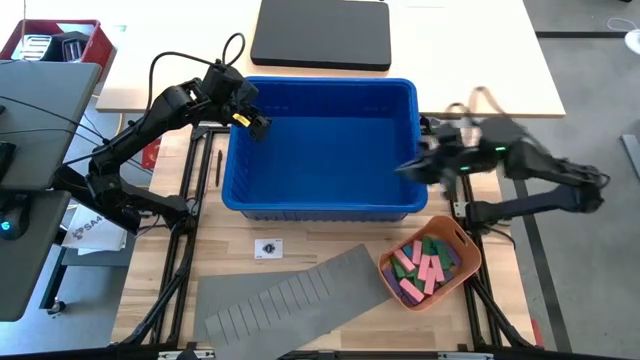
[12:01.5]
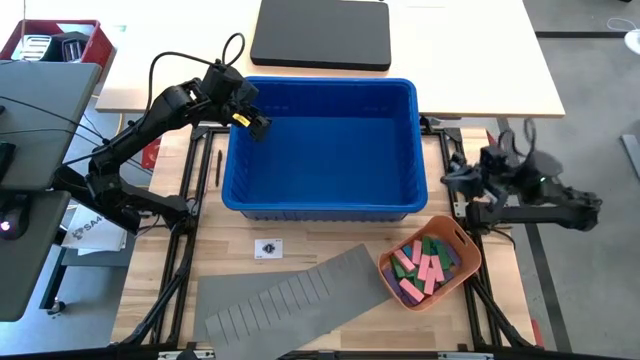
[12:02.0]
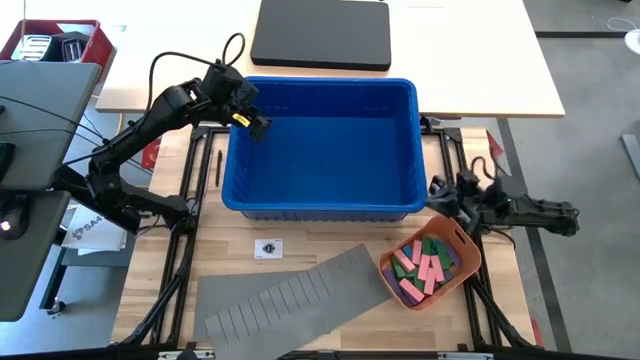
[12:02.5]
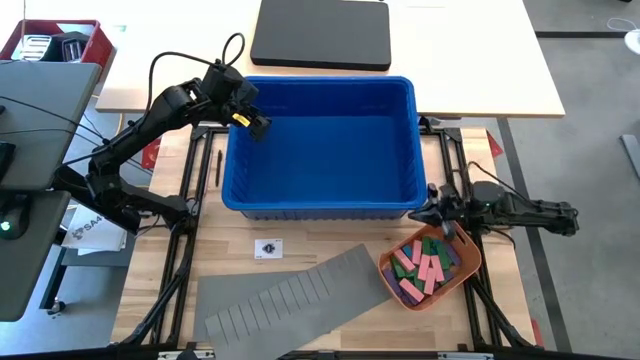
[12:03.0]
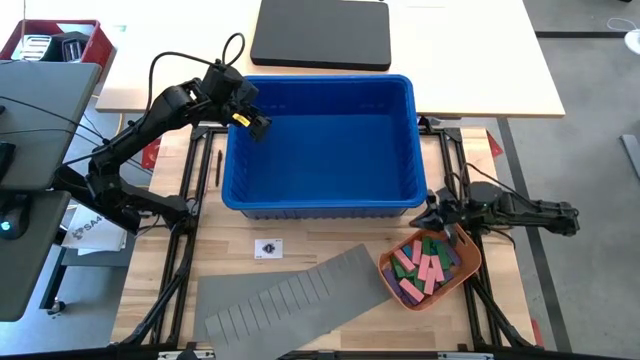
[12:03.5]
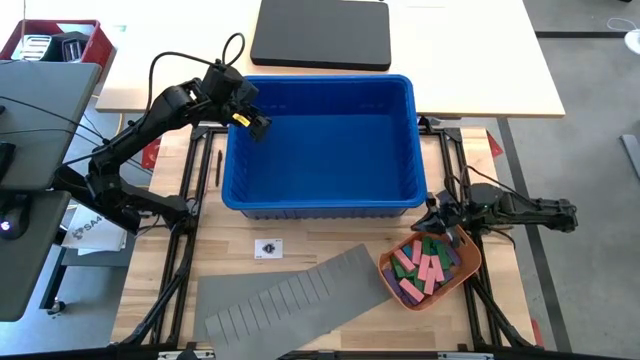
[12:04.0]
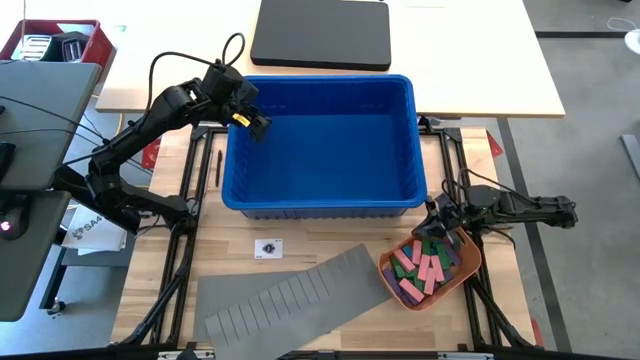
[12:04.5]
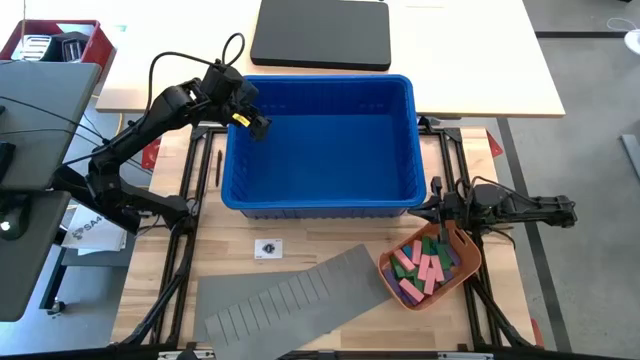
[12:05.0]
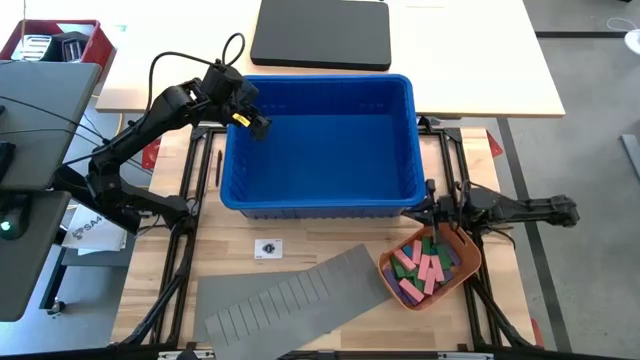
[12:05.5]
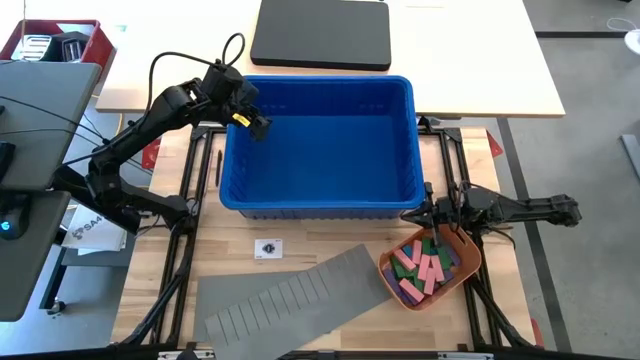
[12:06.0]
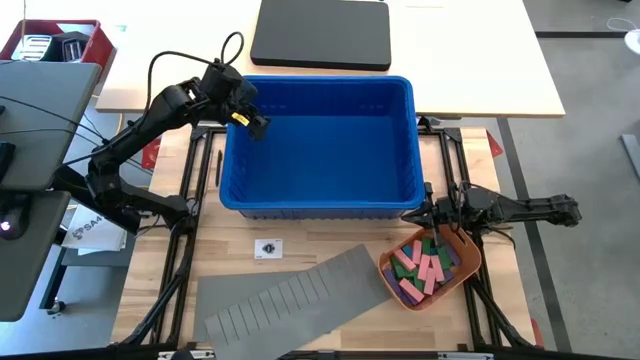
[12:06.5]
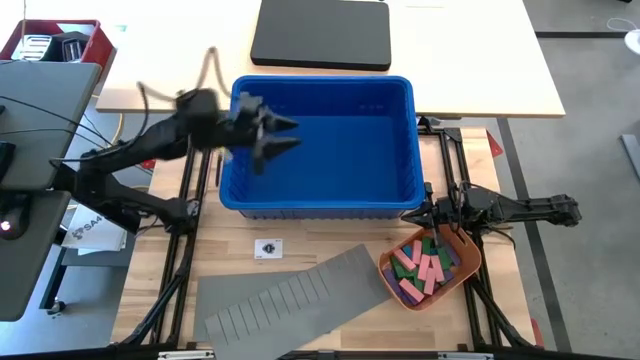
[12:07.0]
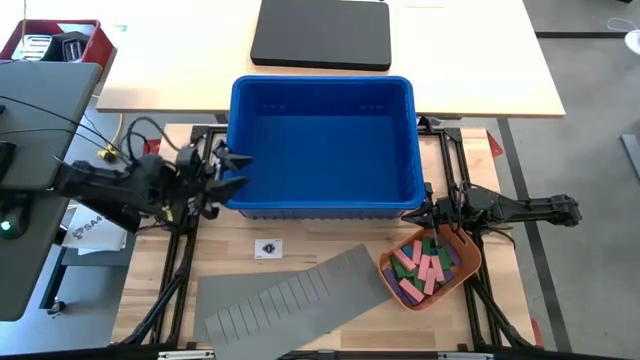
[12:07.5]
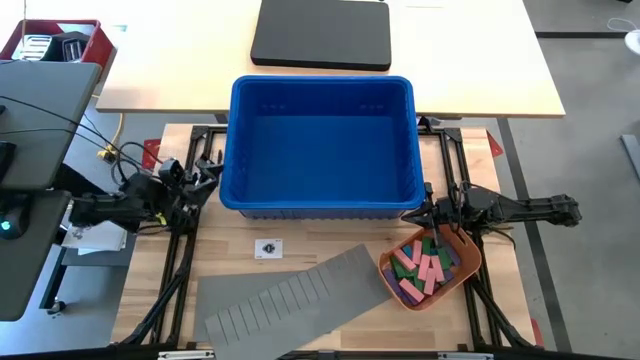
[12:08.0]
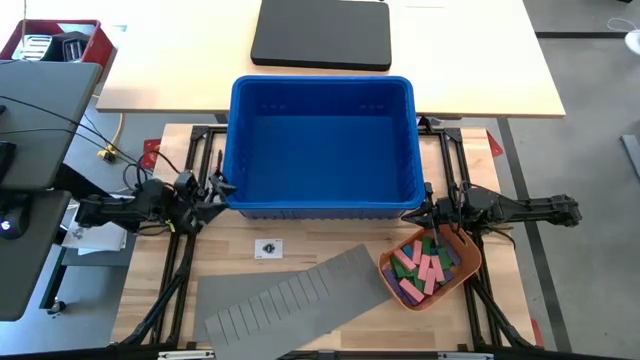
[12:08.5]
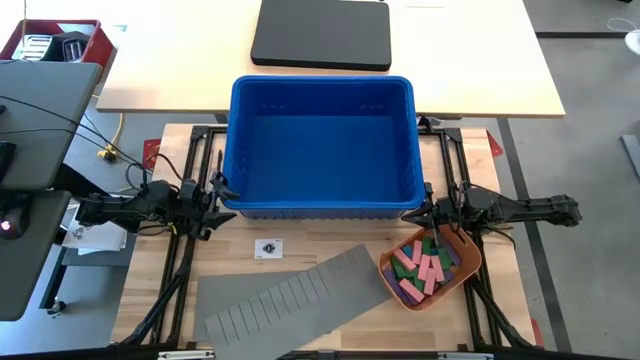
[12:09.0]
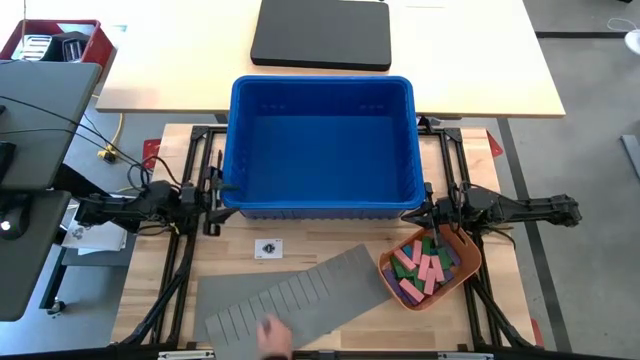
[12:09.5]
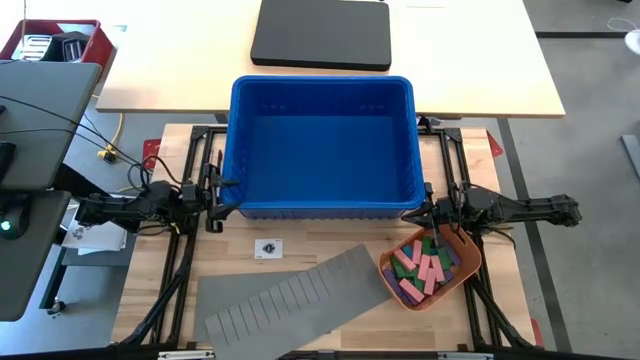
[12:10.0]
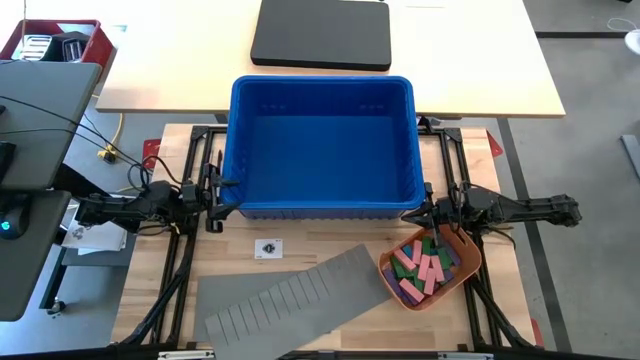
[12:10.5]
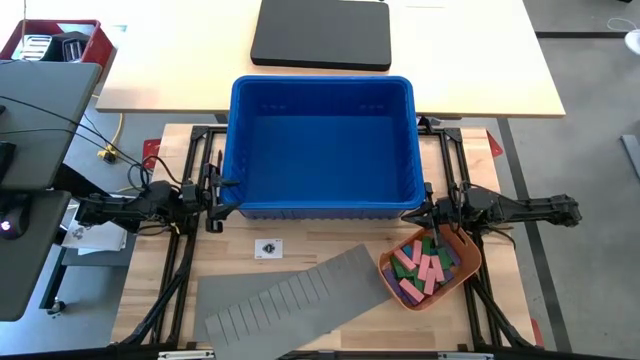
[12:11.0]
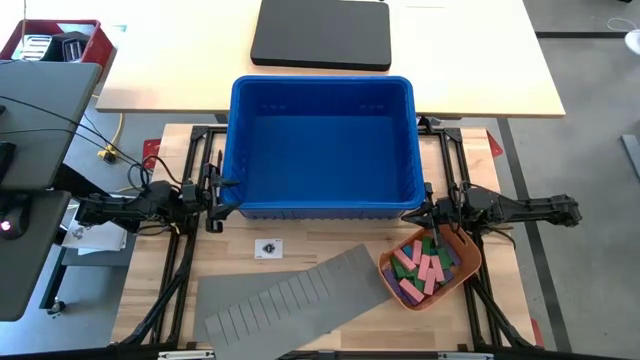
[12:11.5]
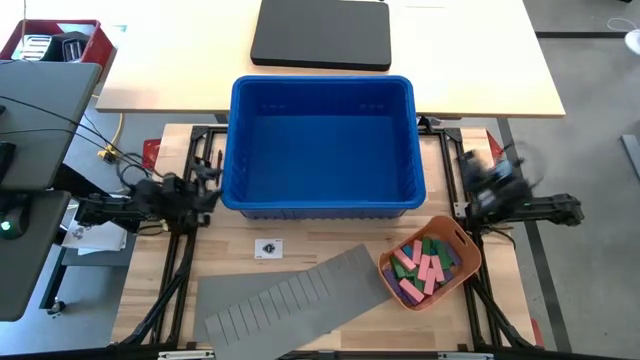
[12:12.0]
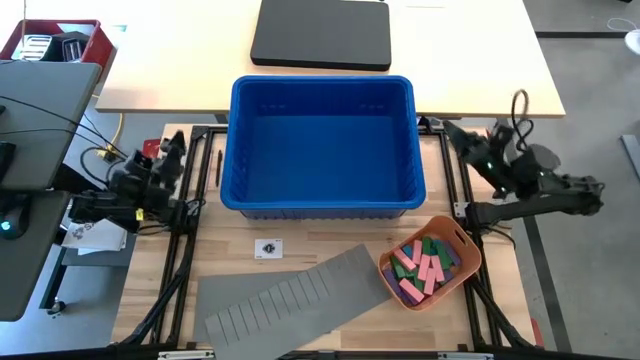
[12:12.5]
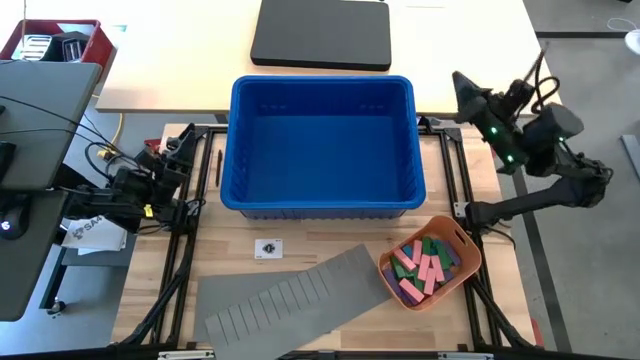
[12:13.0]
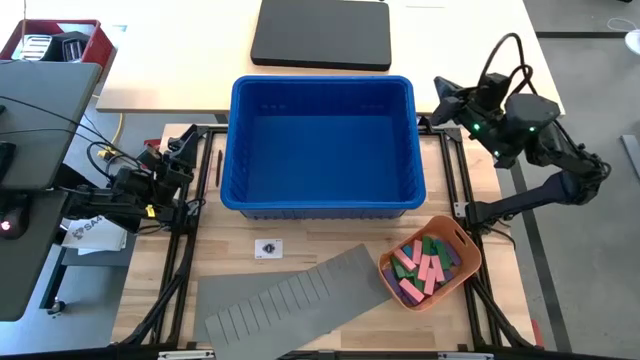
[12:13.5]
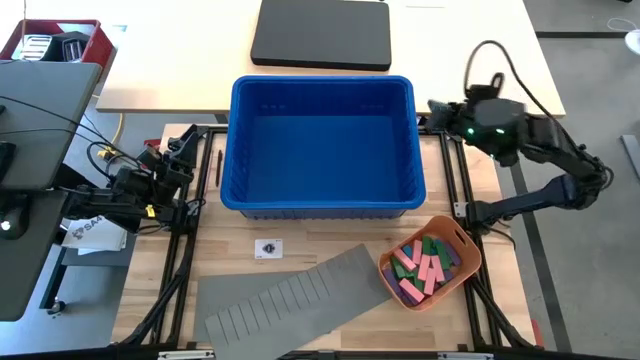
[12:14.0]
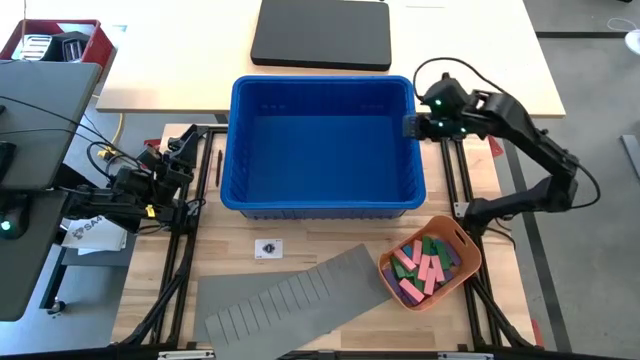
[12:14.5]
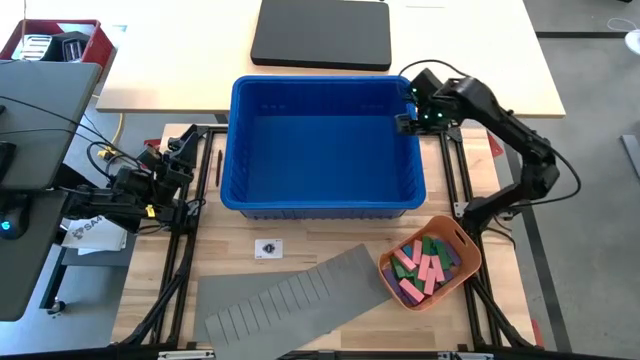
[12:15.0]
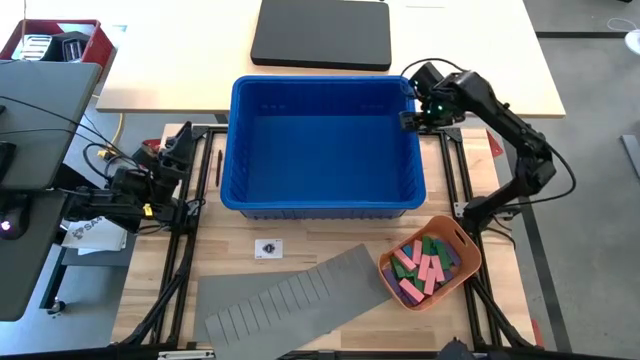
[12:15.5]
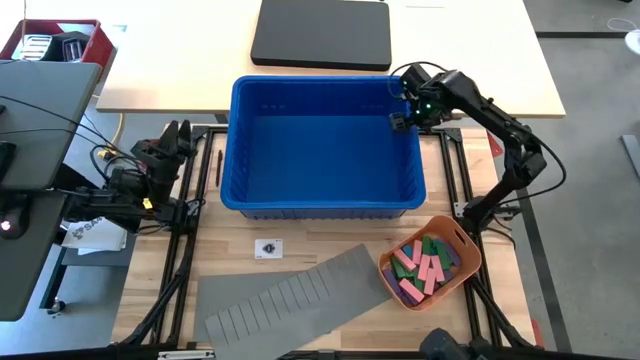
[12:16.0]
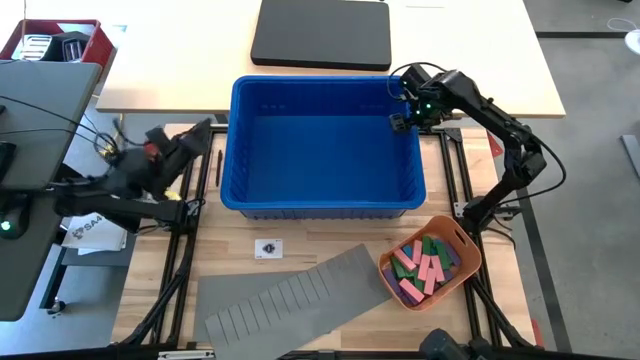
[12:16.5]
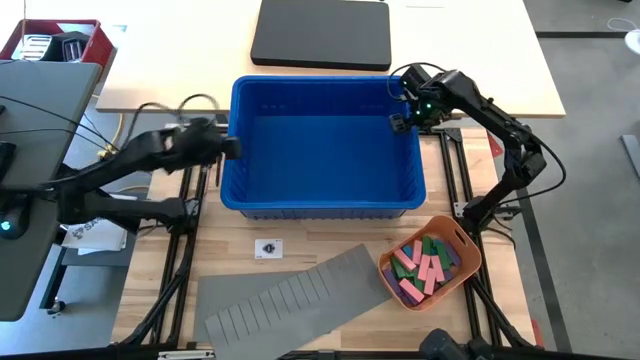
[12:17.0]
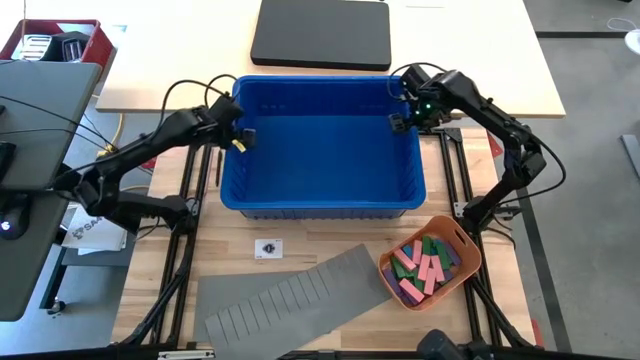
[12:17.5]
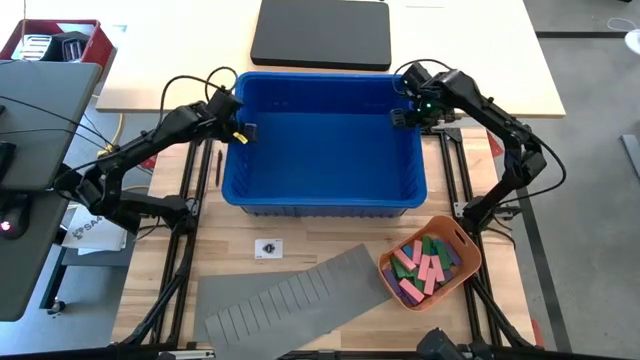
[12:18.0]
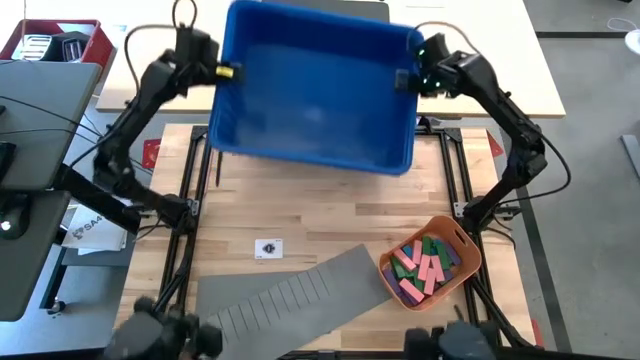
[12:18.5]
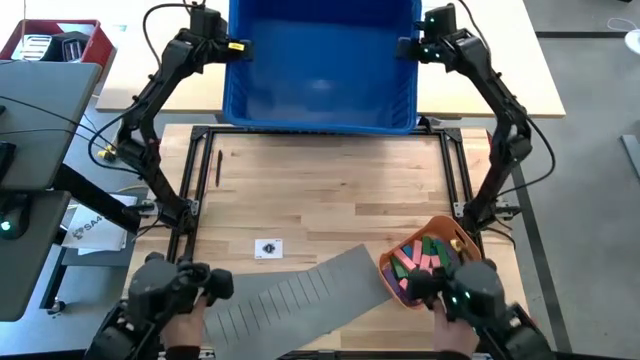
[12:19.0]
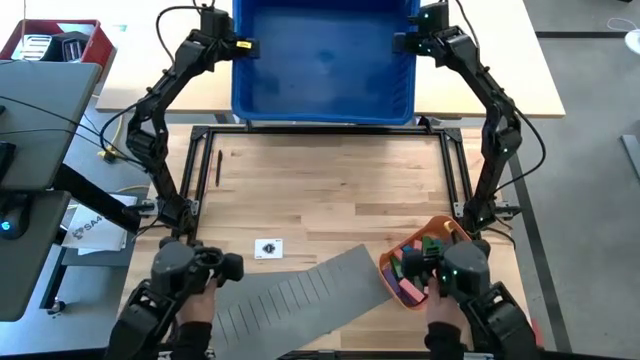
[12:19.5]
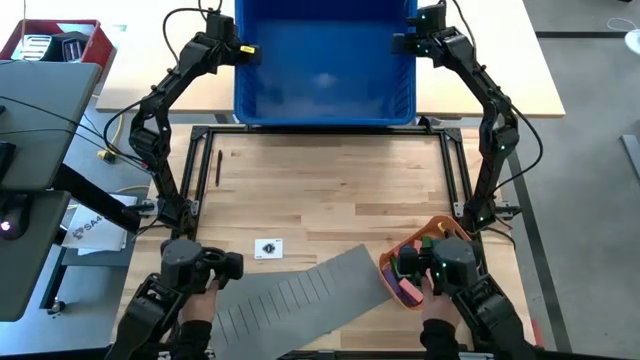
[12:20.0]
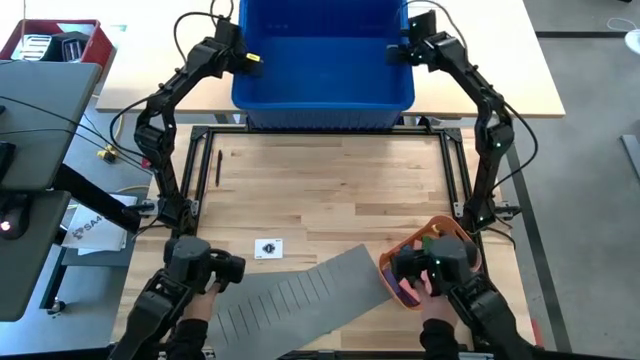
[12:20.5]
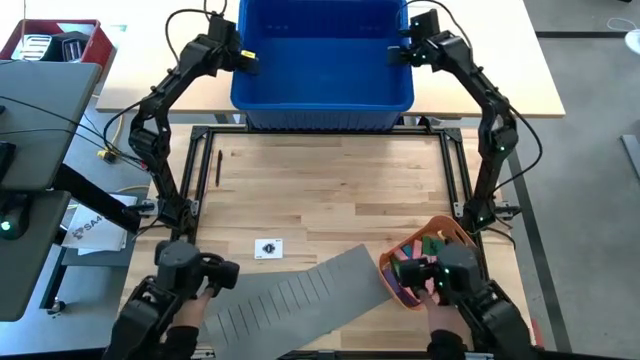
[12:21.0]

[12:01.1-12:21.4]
Task: Sort blocks
Move the blue bin to the other table
